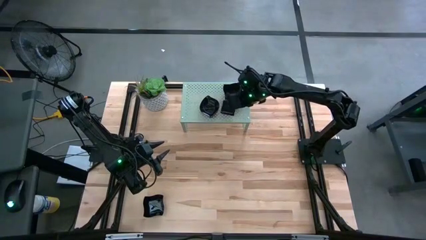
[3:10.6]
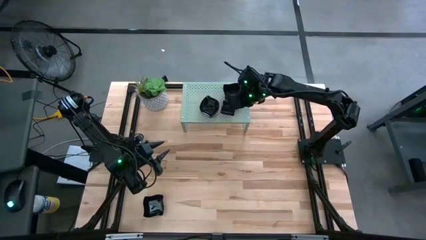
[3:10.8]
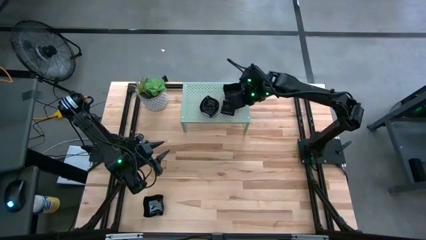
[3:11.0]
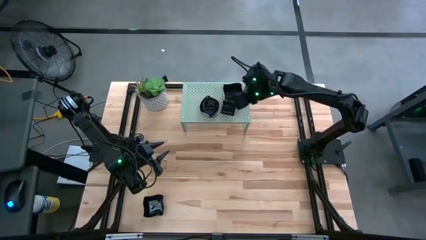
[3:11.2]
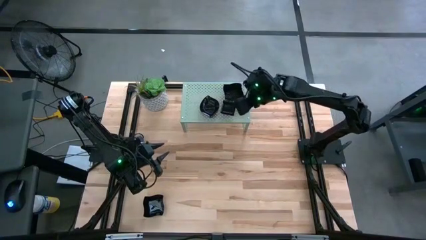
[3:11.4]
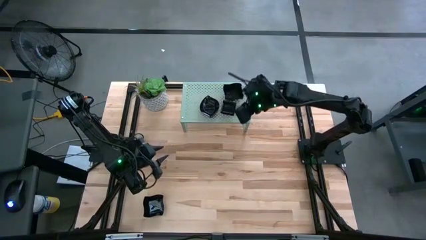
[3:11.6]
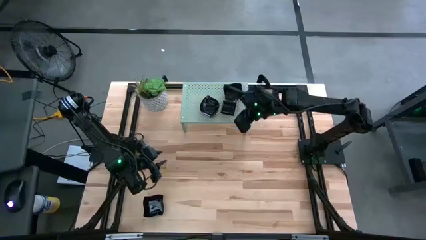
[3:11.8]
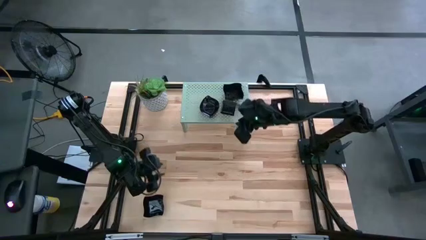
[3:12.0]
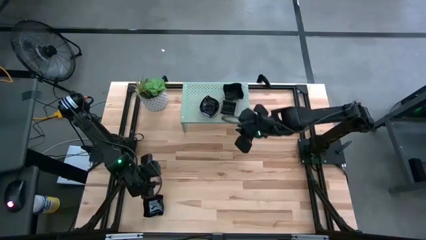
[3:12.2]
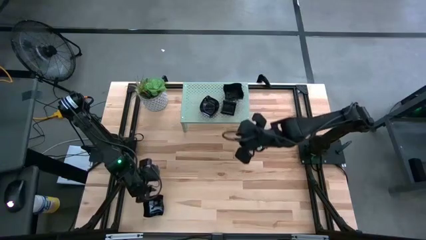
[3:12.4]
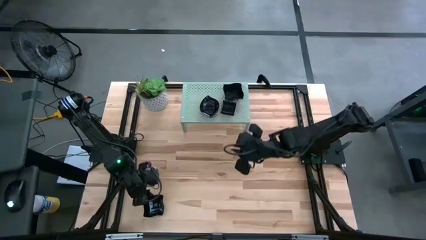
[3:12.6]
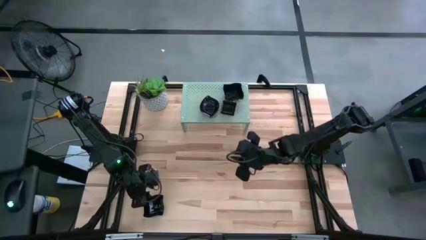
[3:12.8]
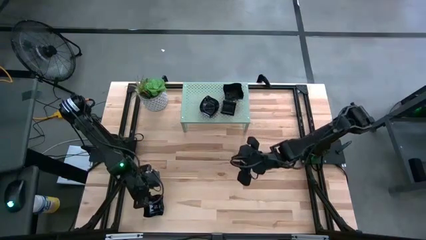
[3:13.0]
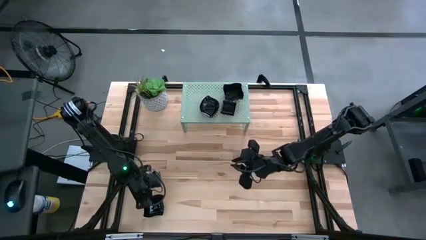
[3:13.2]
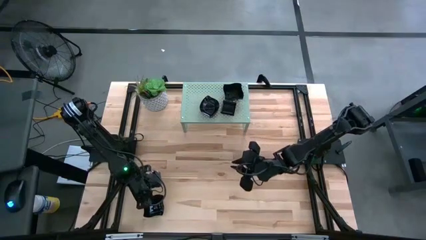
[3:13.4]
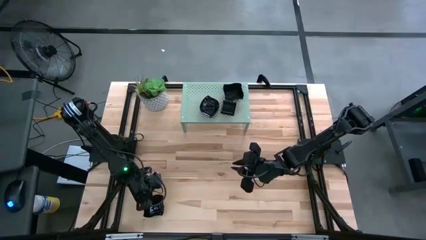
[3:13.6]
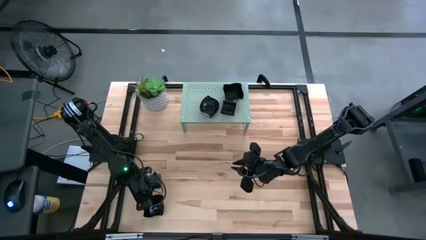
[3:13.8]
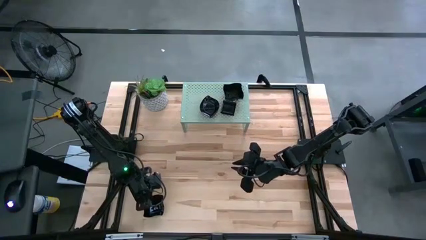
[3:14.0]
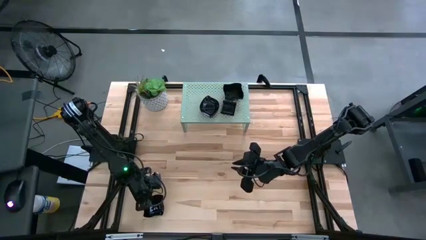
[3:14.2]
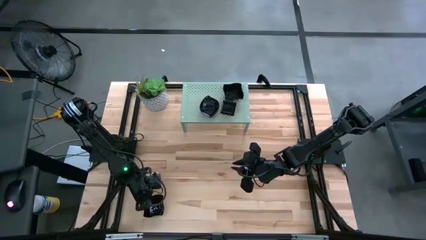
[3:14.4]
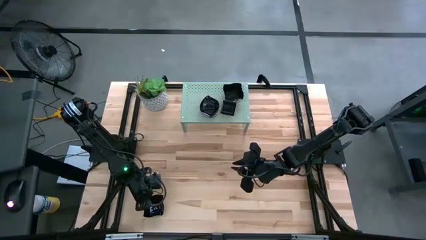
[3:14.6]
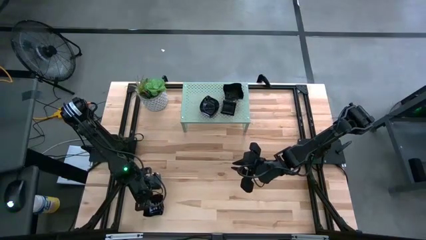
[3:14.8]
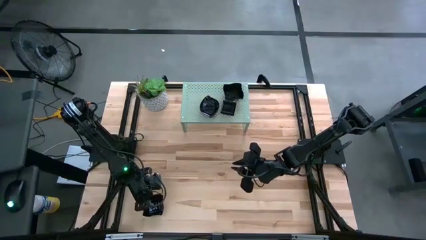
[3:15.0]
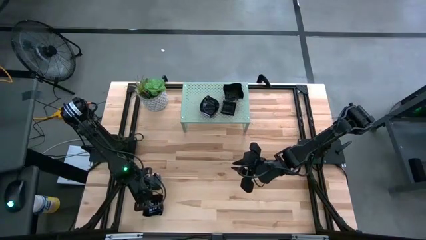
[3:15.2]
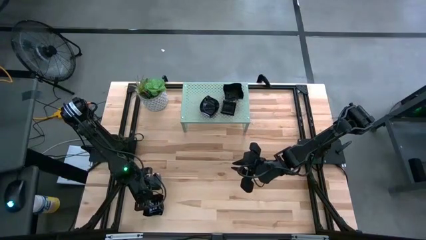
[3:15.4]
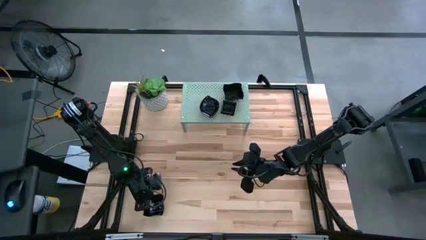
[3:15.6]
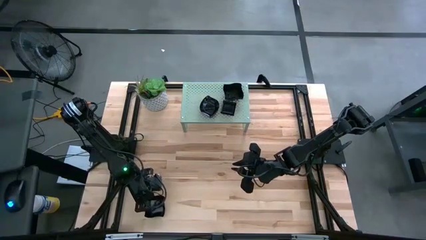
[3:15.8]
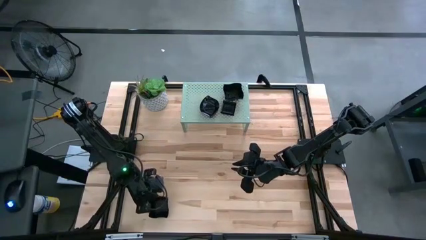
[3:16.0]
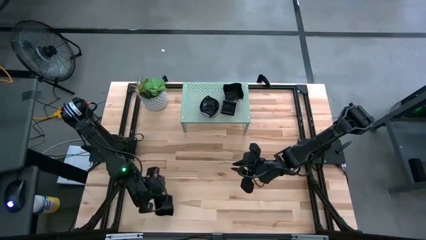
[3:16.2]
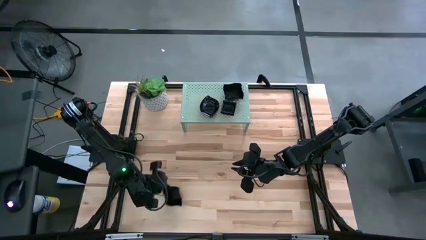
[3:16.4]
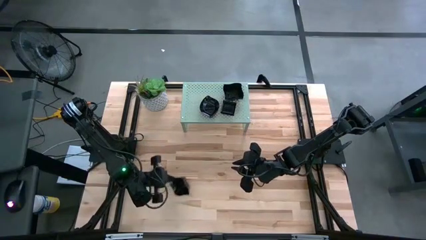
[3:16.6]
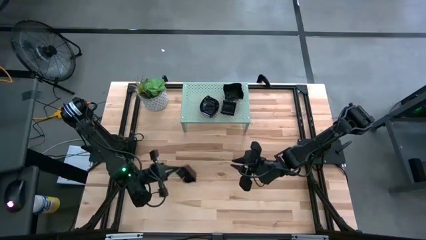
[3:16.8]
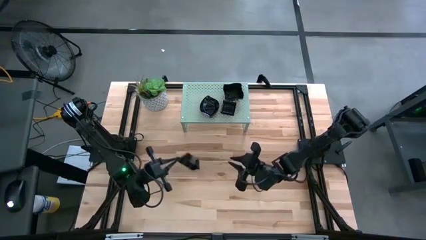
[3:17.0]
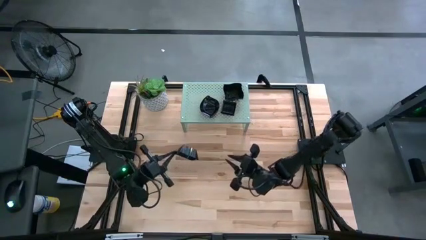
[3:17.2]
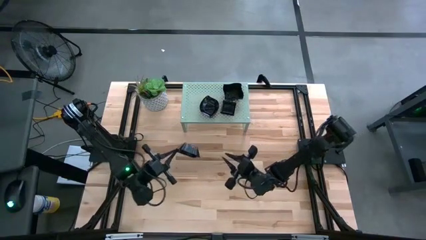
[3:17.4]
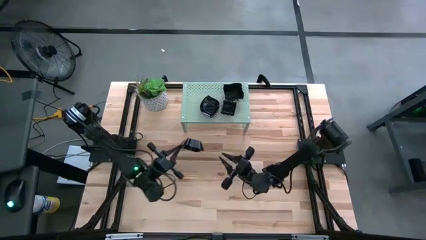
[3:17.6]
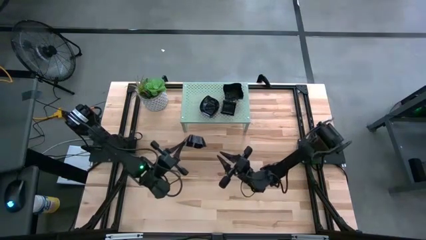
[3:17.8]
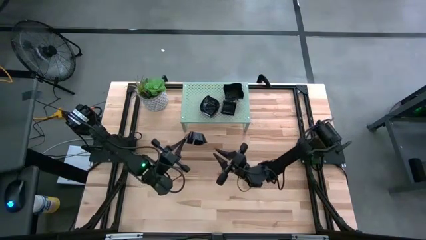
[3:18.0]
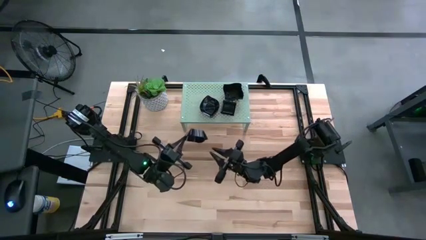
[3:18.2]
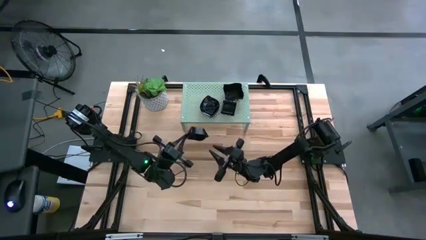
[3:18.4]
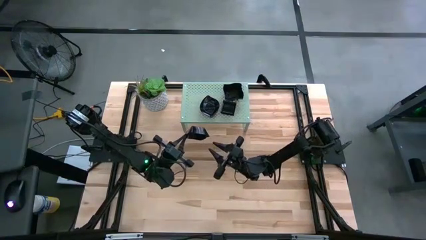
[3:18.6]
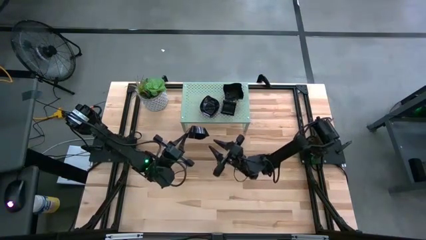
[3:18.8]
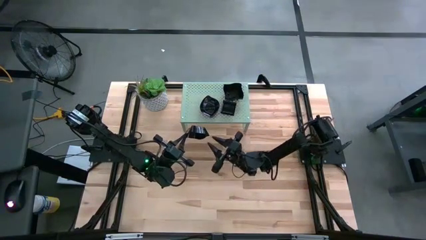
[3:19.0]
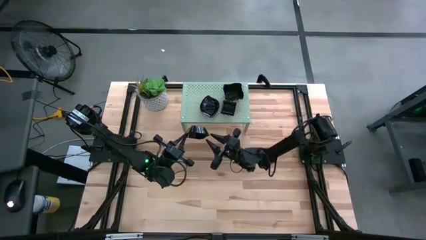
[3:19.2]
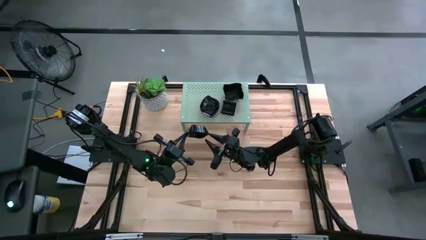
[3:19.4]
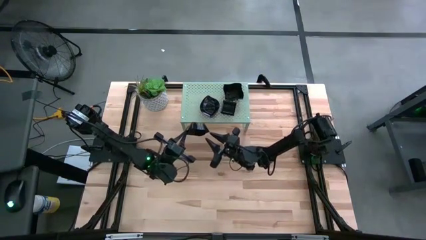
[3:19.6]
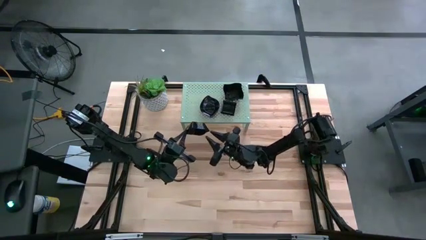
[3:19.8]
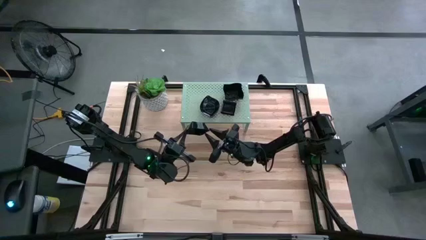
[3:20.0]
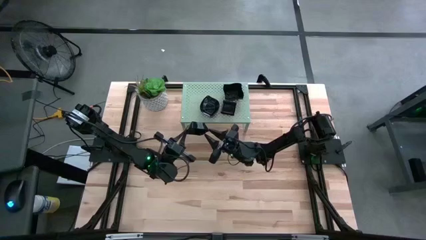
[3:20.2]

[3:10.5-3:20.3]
Task: Pick & Place Mini shaped plates
Stack the distorted square plate on top of the distorted square plate on the shelf

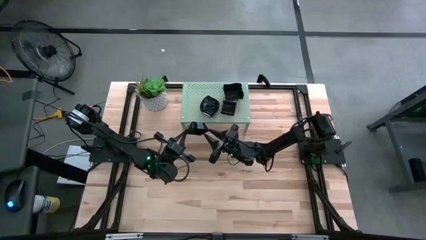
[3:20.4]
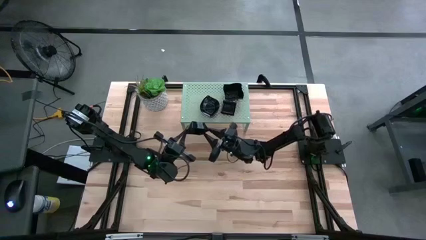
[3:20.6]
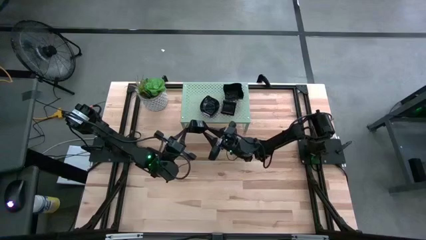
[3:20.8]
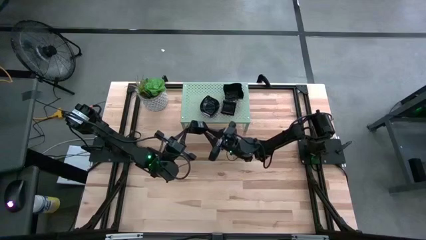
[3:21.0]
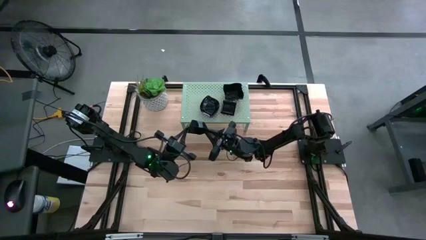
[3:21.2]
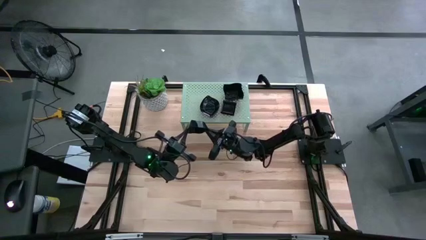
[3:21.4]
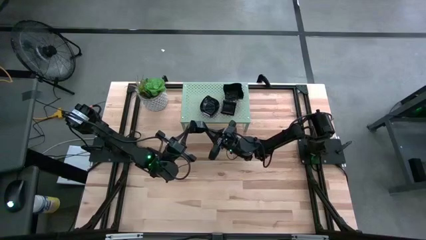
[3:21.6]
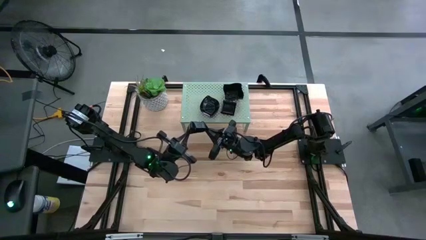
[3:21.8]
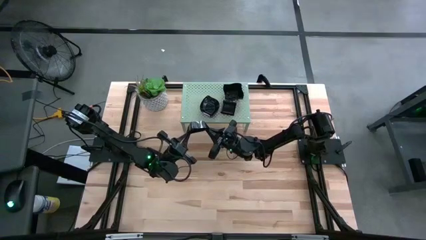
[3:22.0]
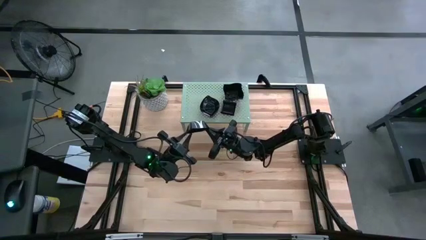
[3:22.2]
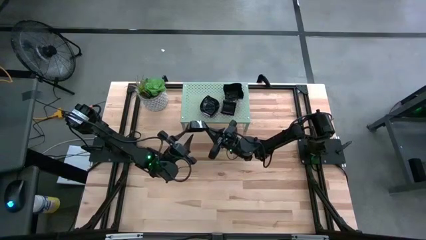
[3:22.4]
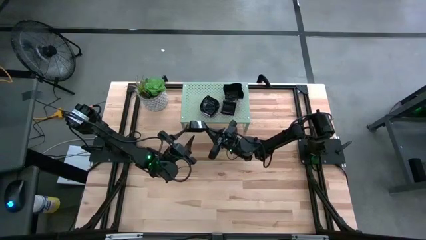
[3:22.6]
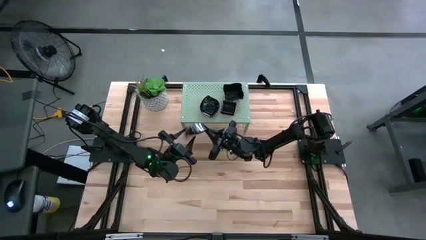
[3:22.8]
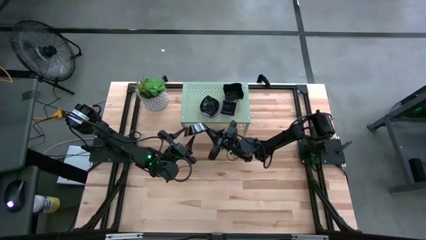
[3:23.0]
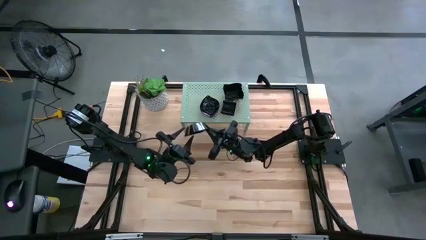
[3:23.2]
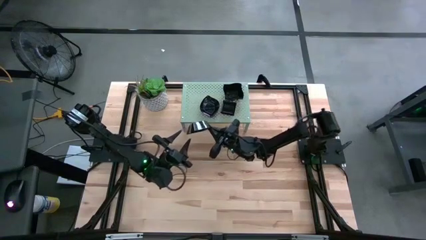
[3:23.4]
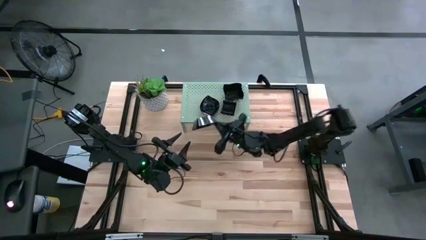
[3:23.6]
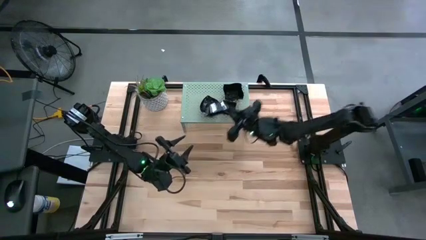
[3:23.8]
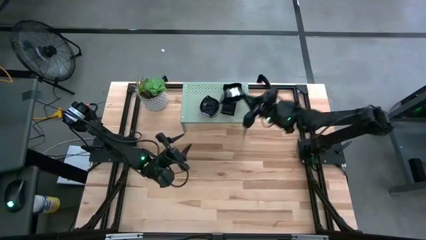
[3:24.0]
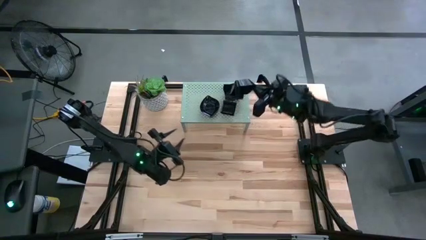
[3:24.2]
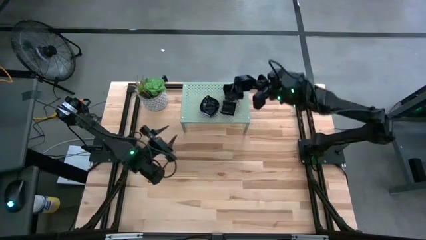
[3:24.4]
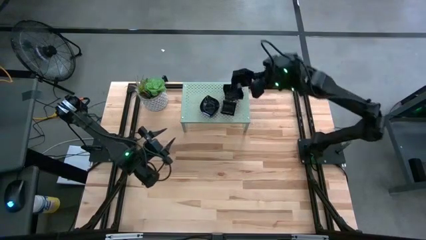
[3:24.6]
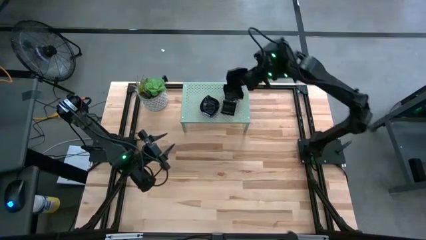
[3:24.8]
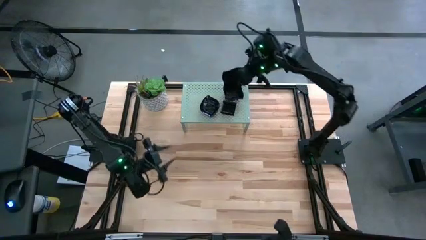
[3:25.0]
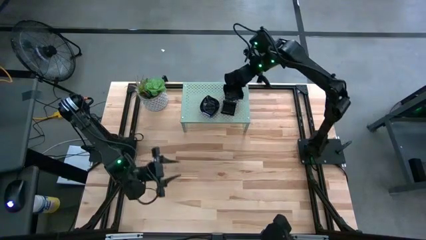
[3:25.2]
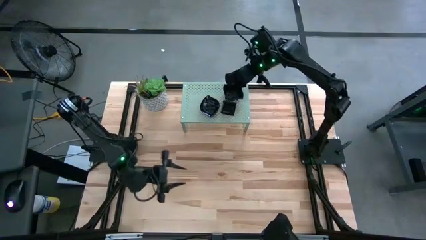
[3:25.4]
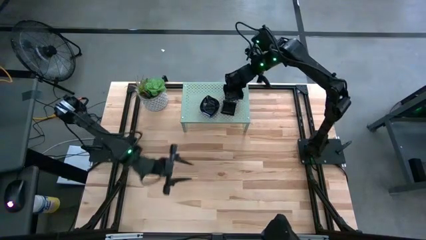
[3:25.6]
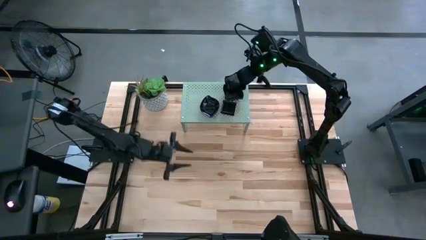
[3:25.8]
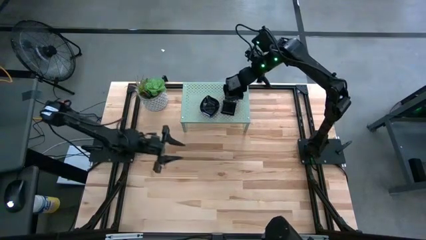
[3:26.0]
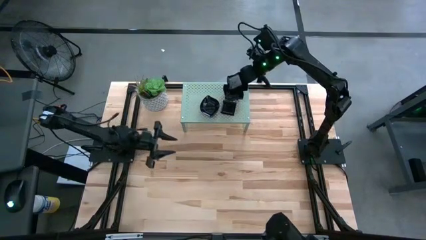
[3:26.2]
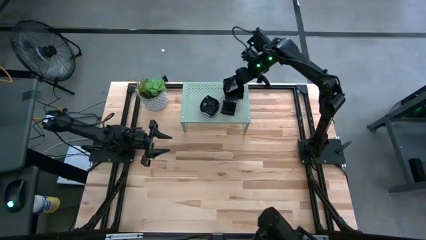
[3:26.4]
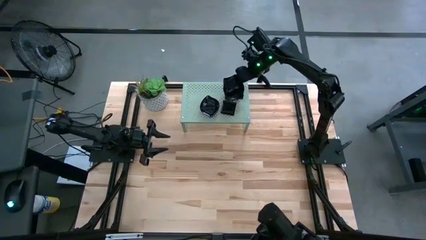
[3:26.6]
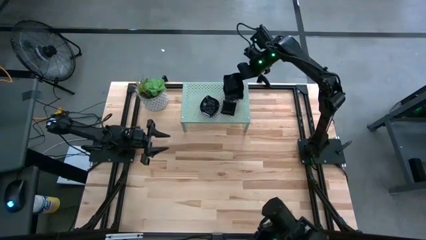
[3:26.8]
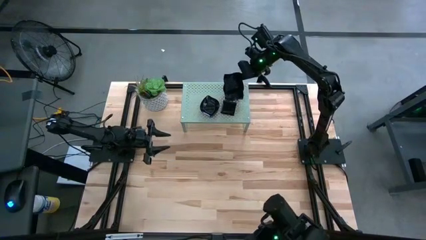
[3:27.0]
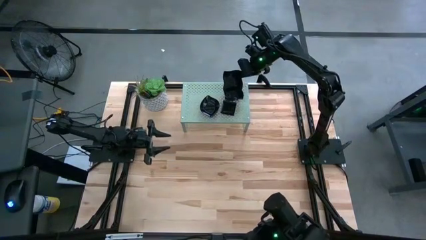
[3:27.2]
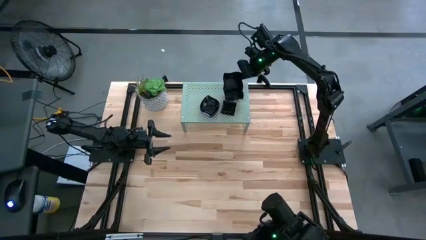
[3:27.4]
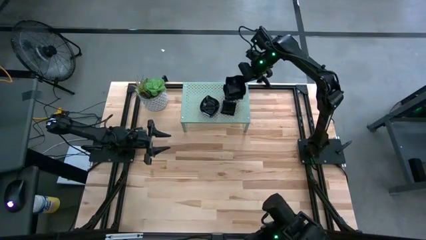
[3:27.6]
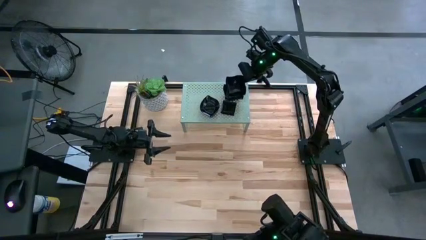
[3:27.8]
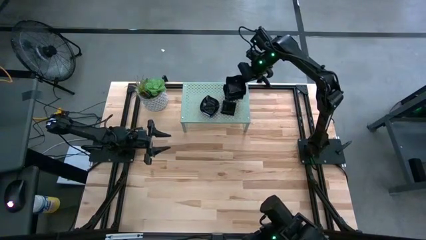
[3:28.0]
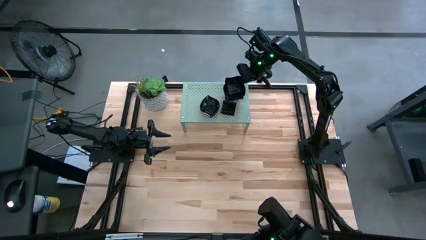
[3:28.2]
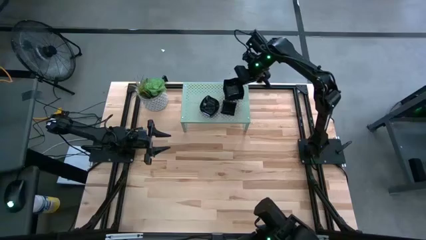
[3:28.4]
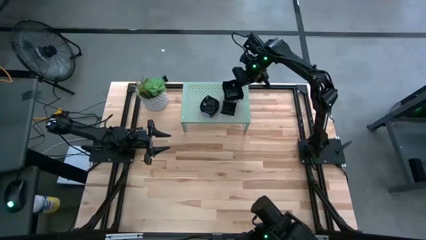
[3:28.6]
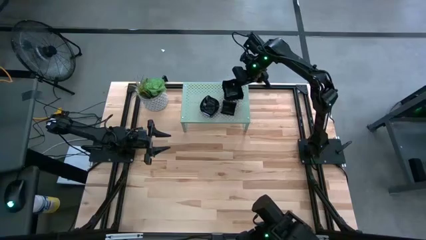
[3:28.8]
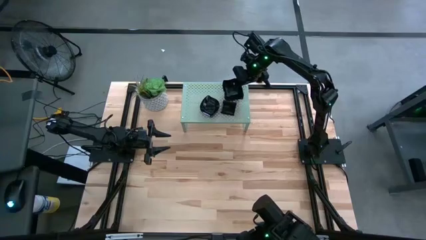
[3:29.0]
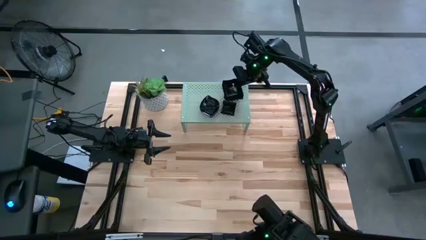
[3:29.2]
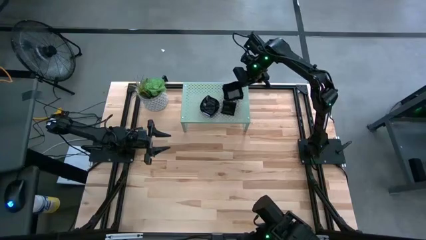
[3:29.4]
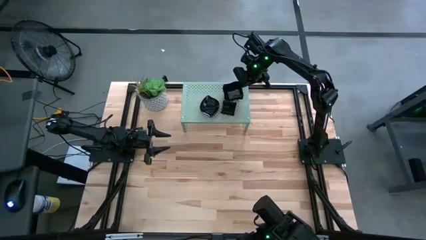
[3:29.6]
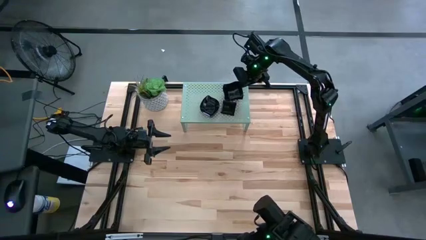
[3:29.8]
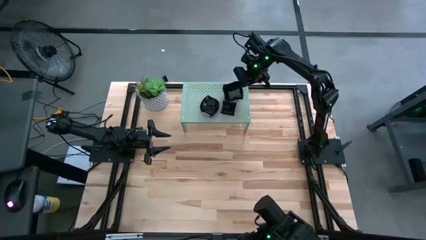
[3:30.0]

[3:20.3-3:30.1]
Stack the distorted square plate on top of the distorted square plate on the shelf
